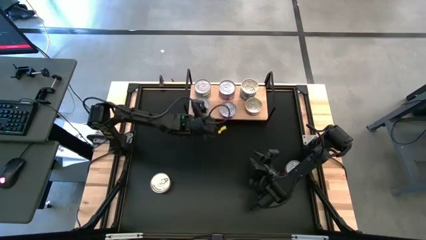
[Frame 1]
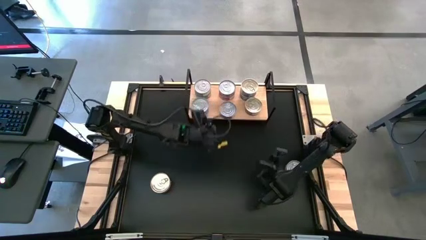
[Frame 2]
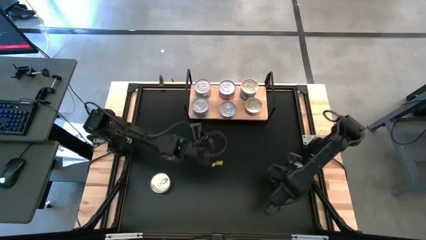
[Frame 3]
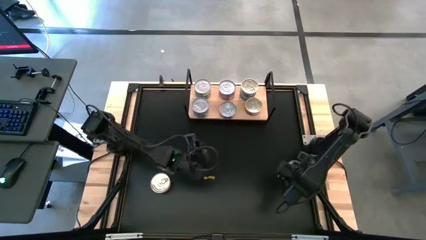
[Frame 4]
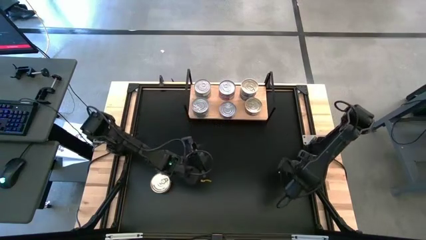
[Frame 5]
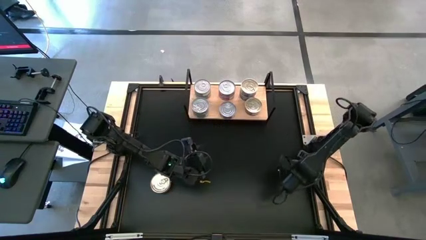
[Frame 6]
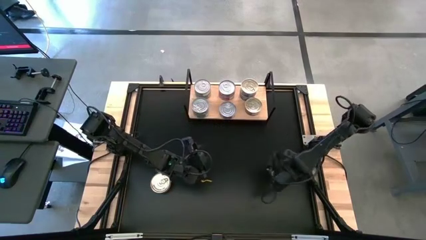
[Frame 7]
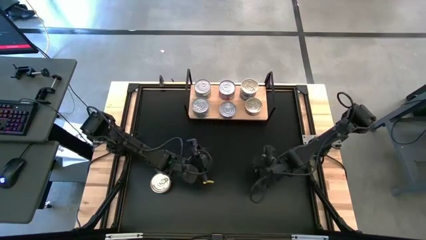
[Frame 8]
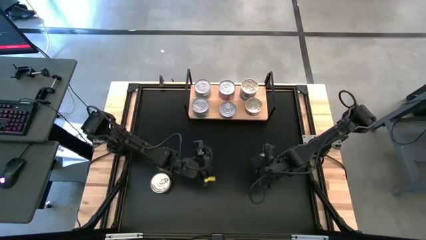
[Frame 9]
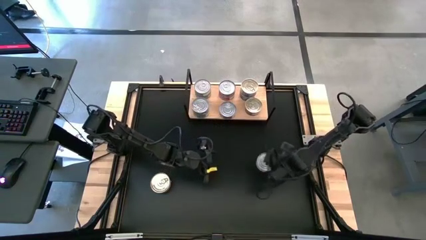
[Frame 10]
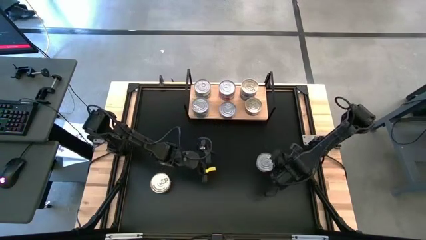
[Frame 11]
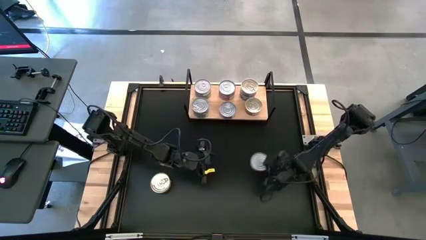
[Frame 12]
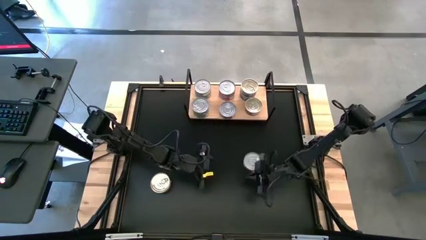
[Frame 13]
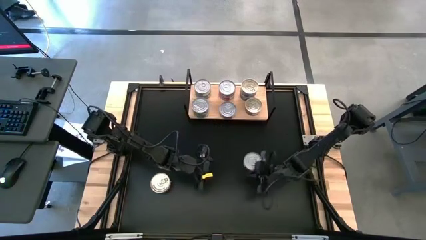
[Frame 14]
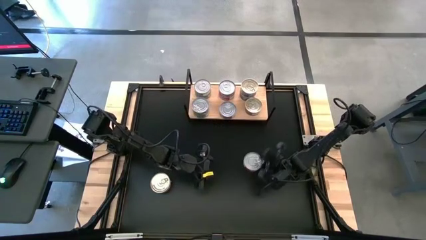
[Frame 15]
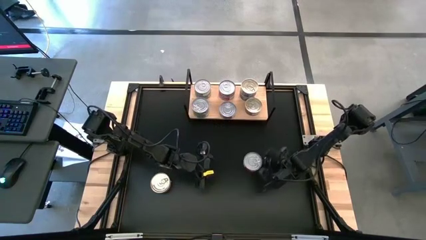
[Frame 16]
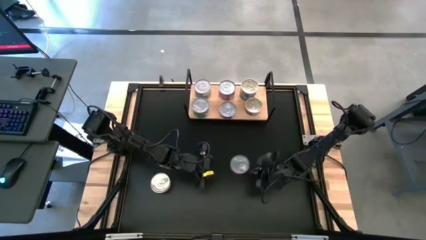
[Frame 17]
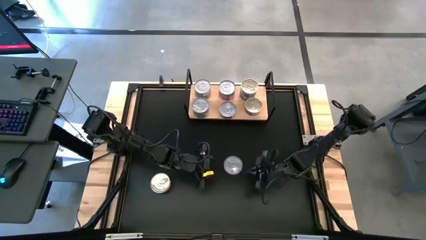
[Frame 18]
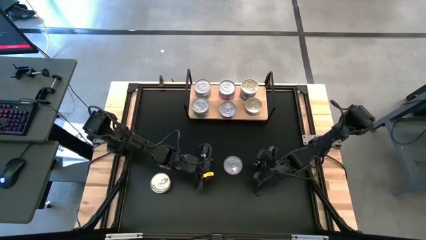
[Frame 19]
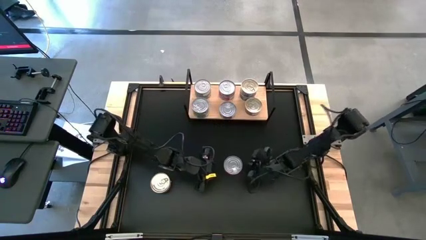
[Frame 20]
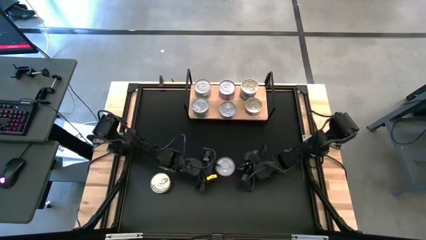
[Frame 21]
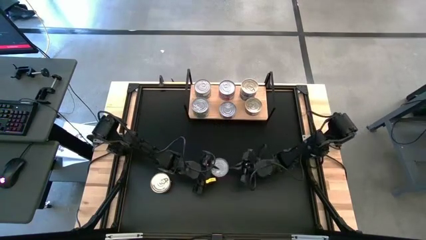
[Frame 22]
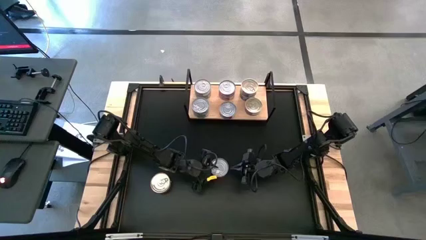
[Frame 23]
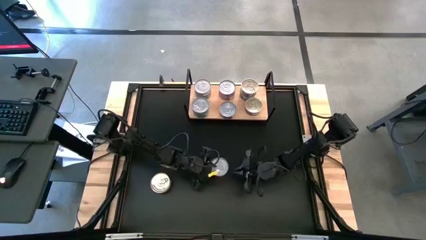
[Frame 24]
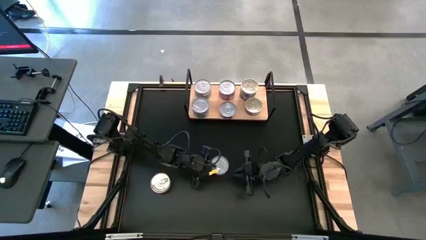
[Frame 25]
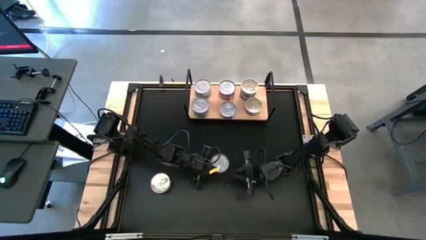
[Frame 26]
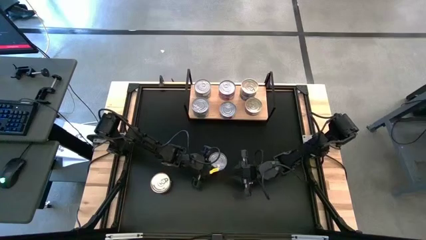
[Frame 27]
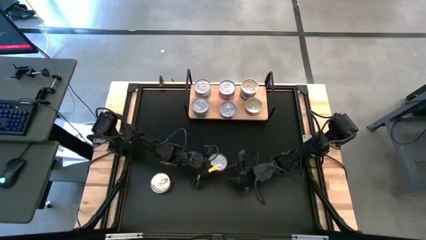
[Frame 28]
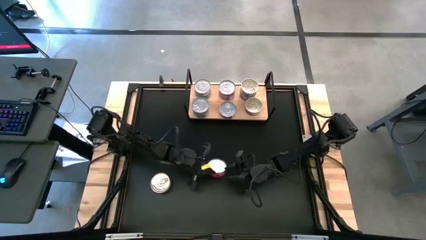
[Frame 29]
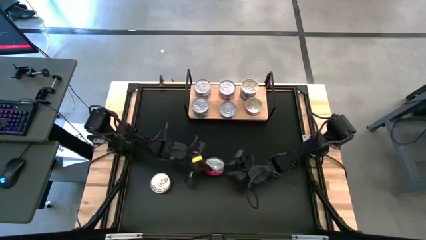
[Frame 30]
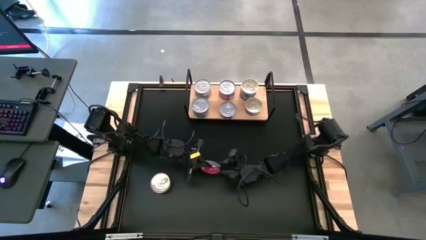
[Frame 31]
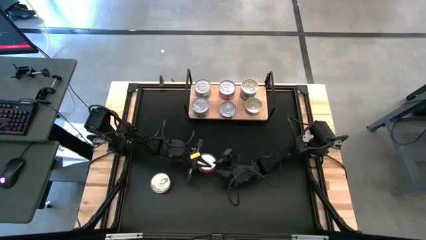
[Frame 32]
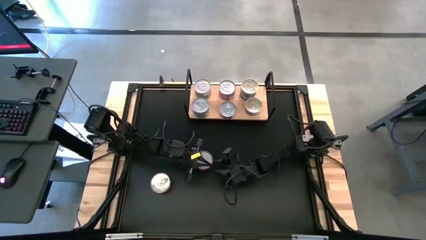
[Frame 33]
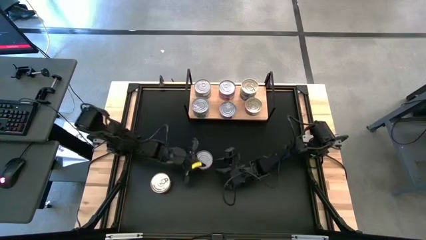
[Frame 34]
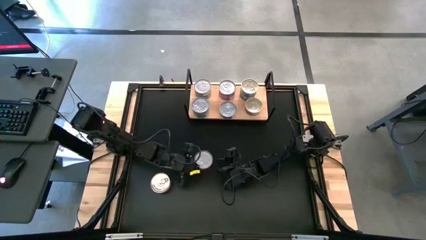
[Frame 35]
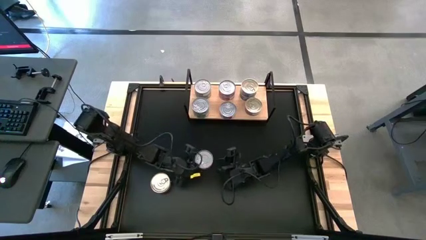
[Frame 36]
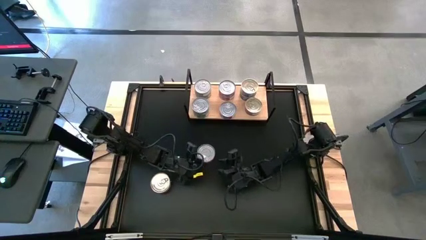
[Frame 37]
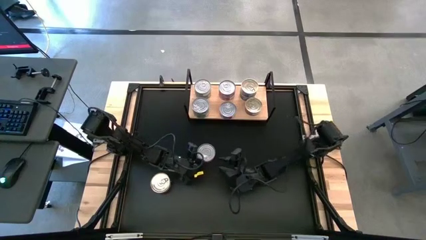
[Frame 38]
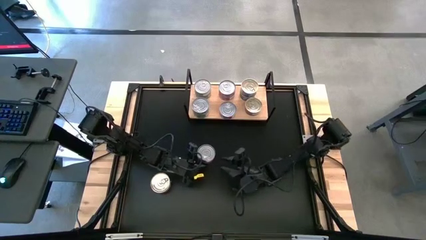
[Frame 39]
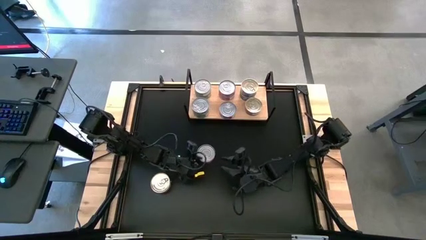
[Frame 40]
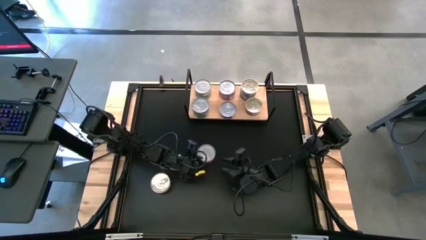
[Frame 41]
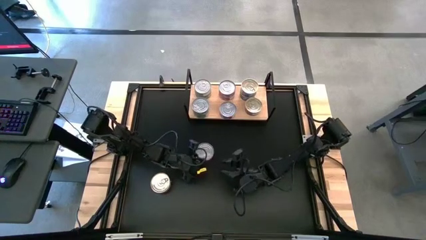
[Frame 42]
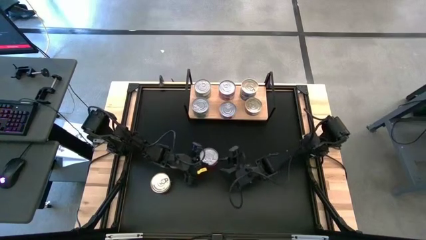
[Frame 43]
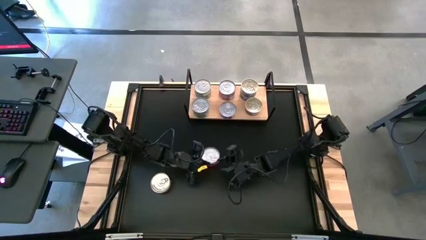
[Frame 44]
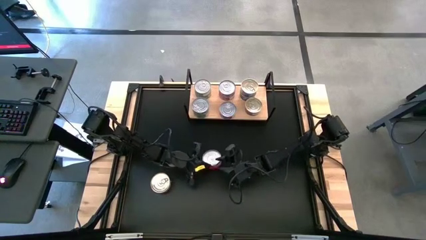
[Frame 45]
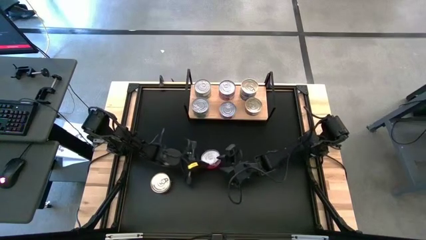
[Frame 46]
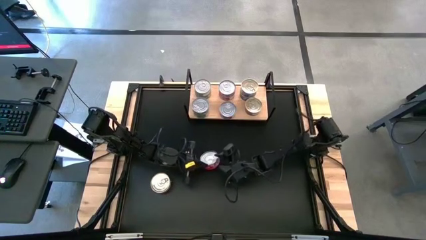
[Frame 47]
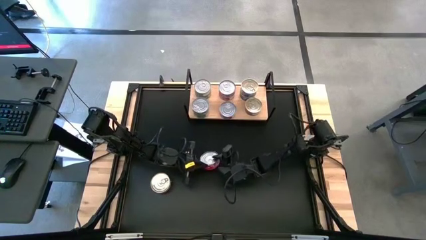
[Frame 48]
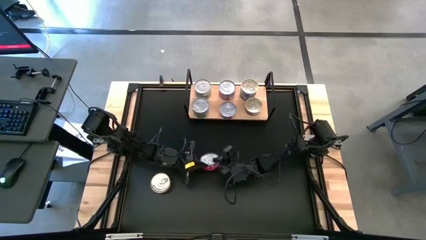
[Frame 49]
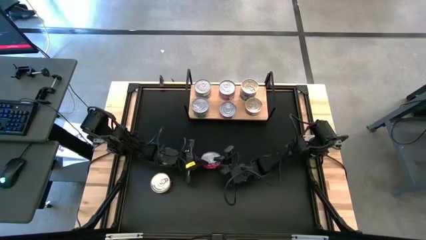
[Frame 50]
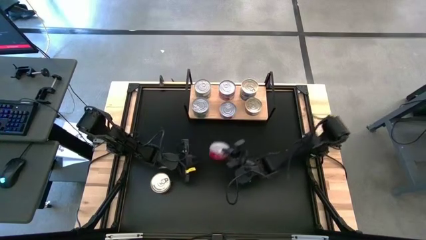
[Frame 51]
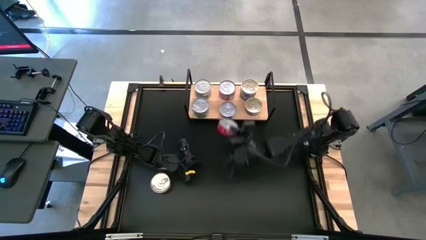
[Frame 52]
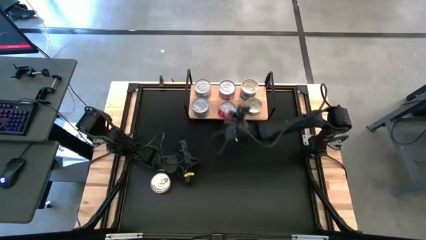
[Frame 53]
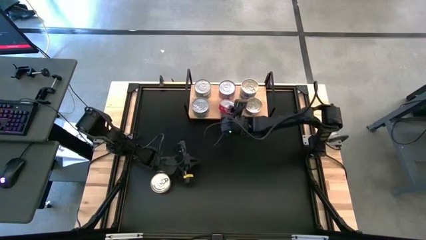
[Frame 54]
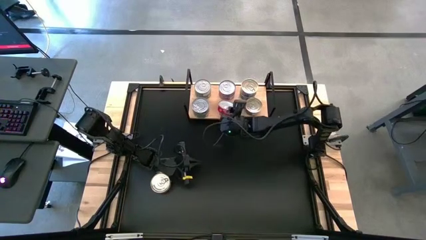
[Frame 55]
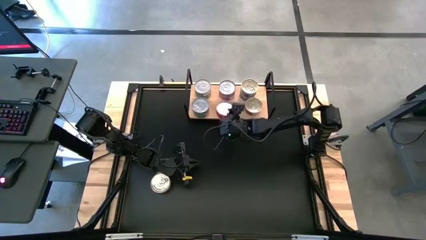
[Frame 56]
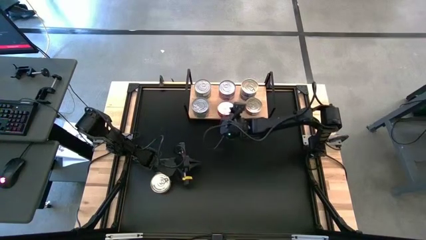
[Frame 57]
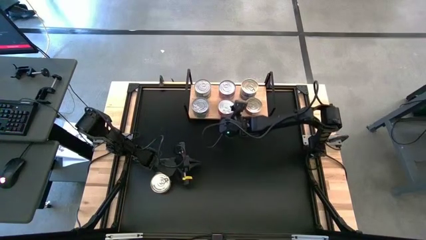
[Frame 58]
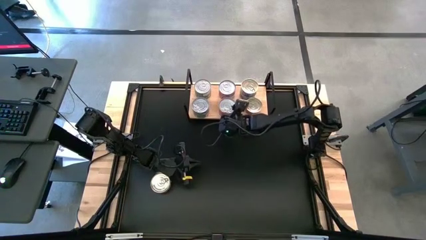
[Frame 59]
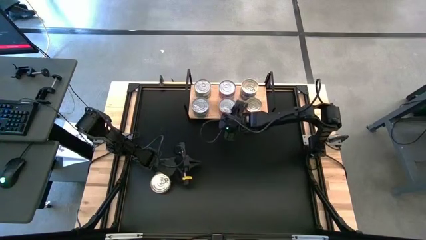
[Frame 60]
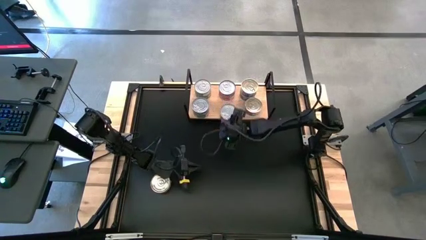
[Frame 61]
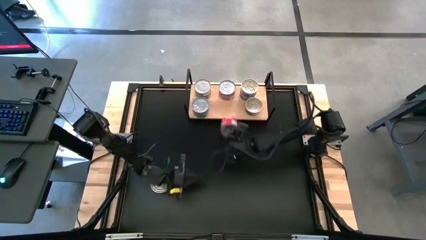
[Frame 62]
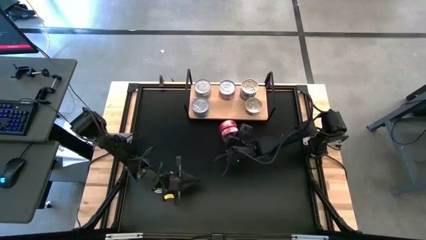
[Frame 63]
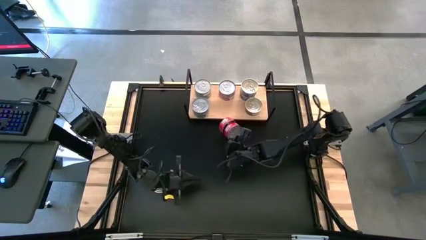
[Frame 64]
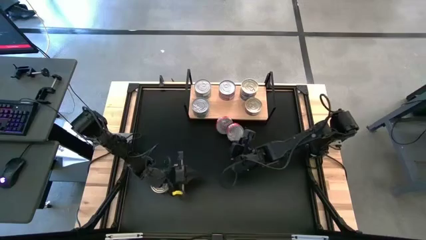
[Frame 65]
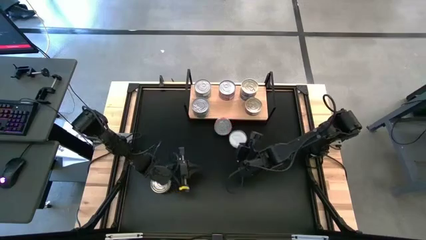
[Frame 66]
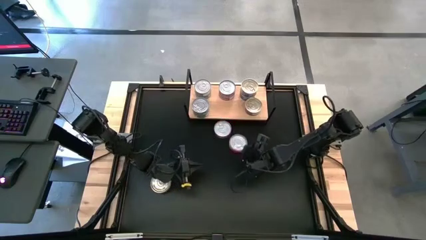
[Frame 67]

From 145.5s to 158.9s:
Task: Stack canned seafood by type on shelf
Stack the red tuna can on top of the red tuna can on the shelf
